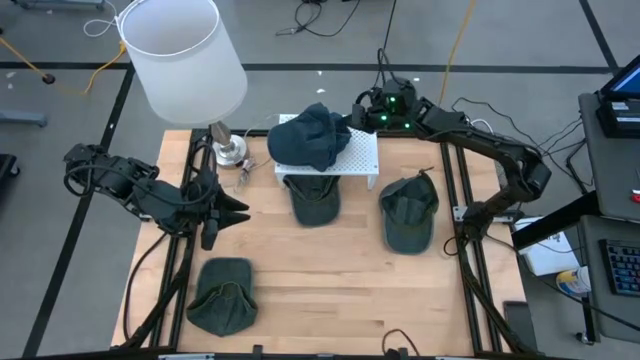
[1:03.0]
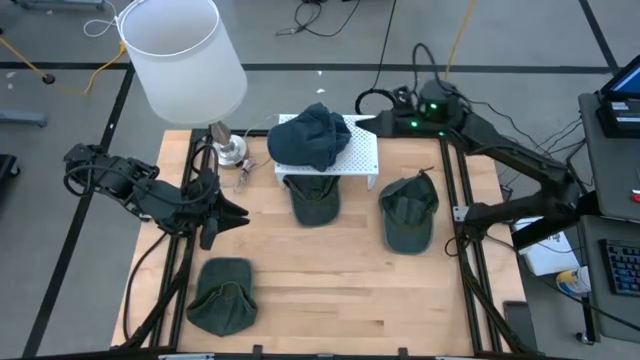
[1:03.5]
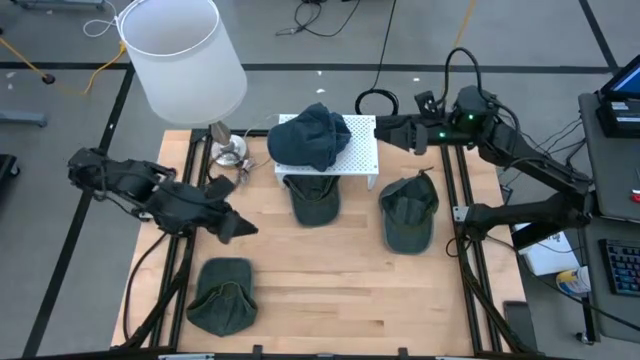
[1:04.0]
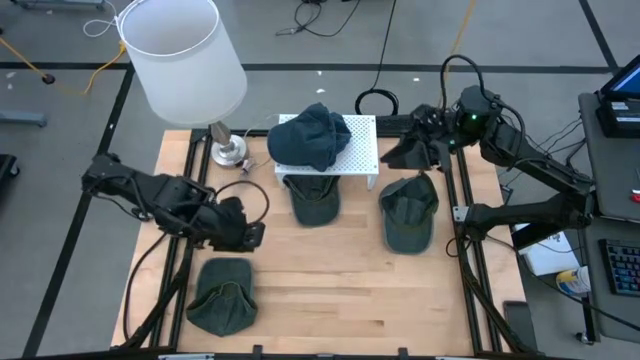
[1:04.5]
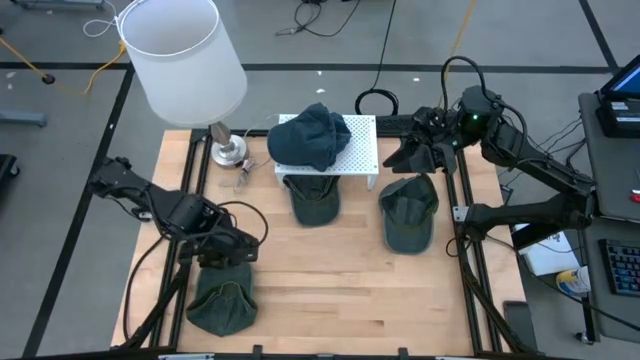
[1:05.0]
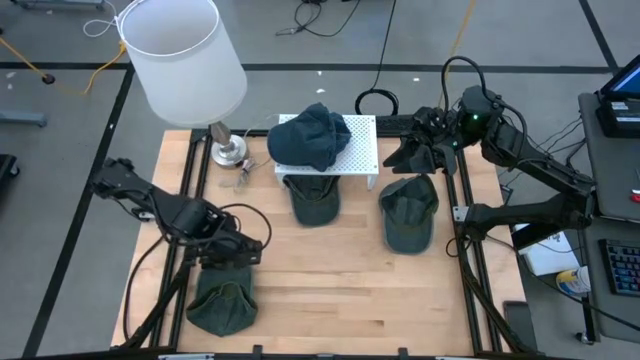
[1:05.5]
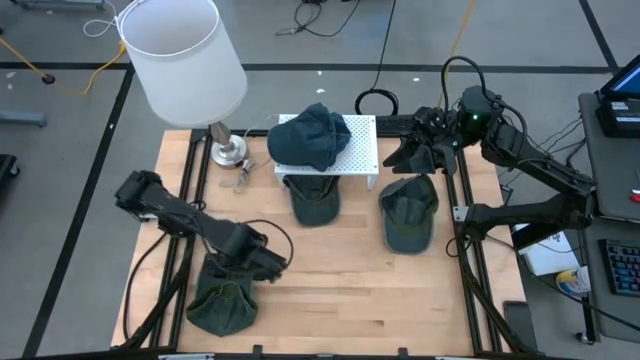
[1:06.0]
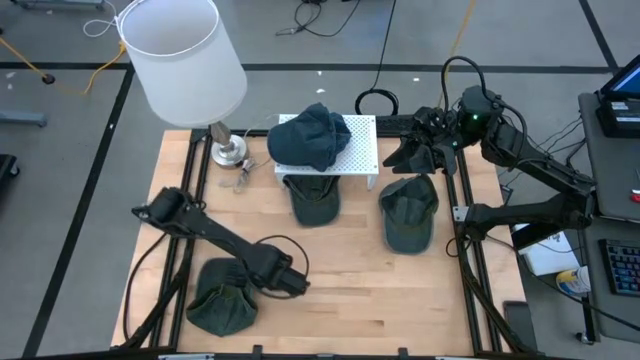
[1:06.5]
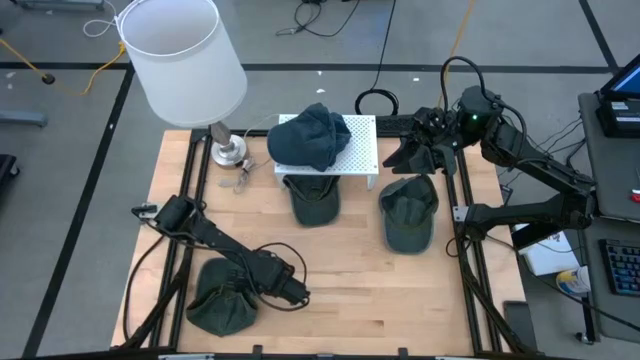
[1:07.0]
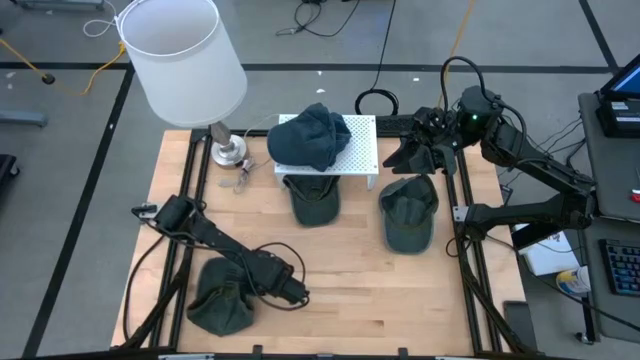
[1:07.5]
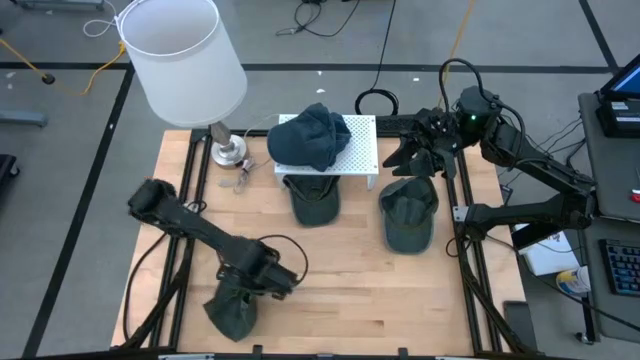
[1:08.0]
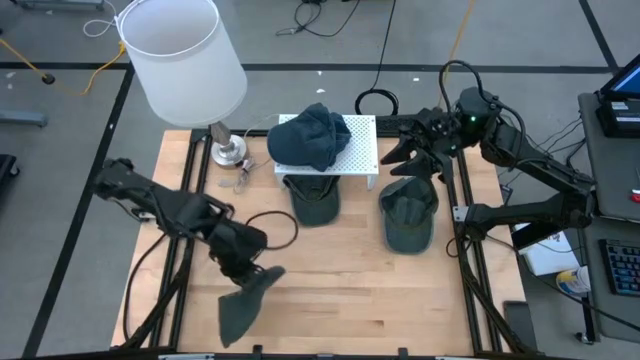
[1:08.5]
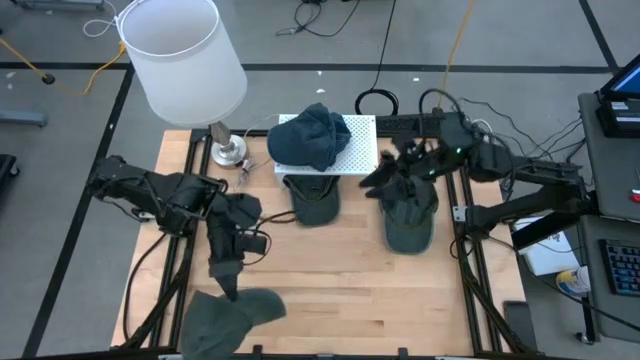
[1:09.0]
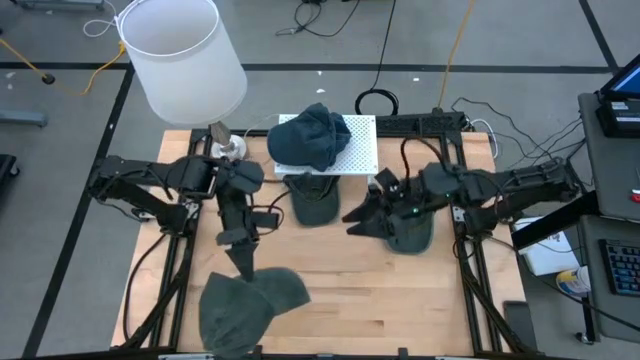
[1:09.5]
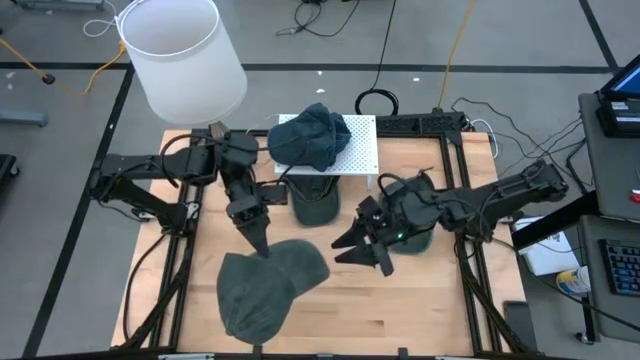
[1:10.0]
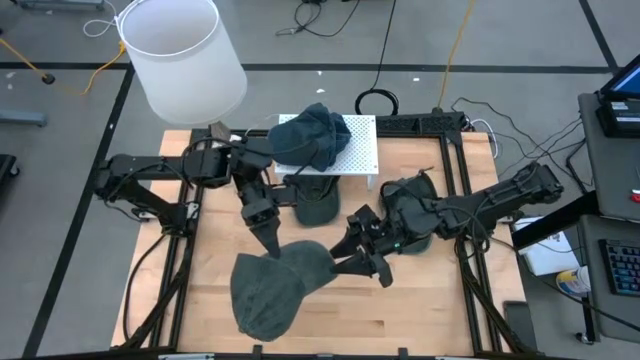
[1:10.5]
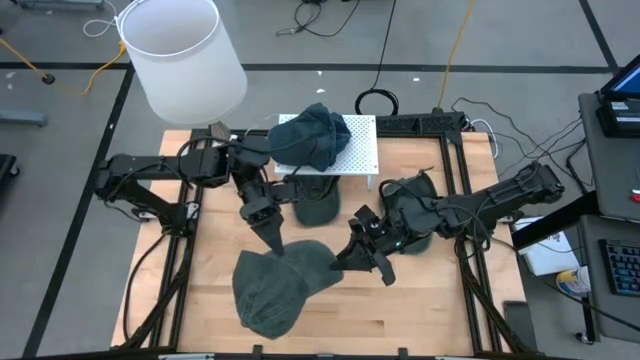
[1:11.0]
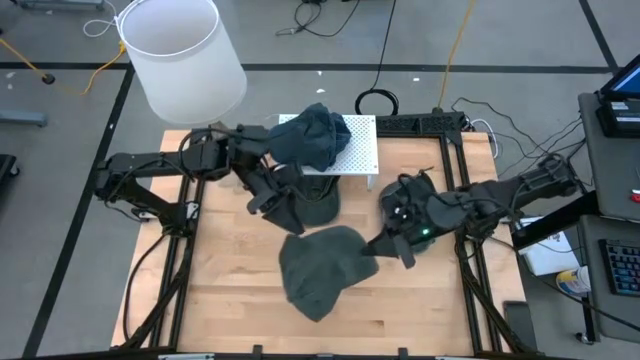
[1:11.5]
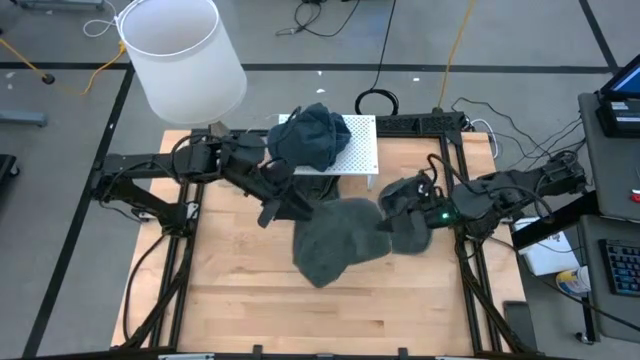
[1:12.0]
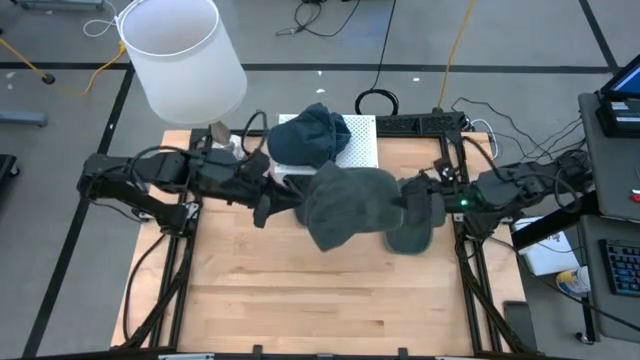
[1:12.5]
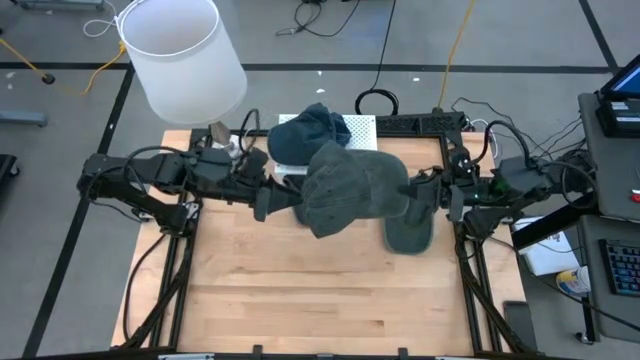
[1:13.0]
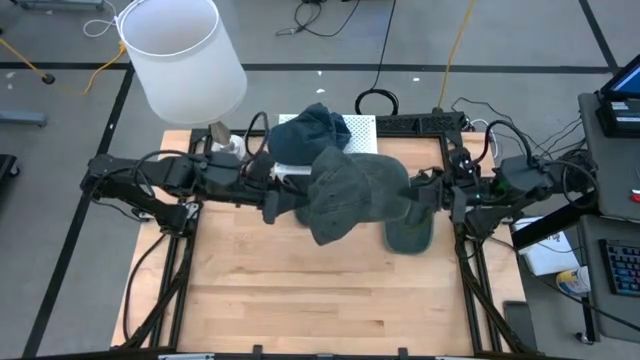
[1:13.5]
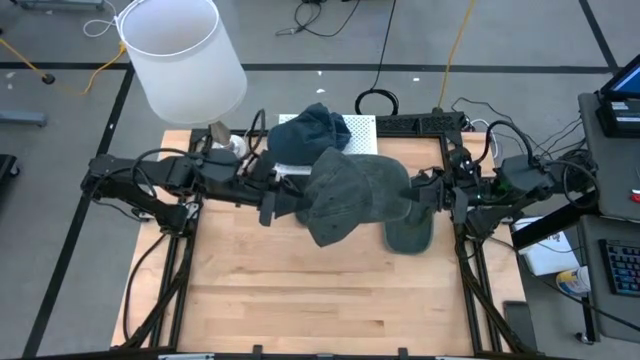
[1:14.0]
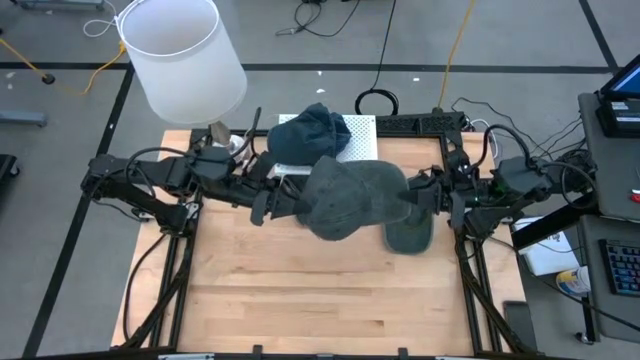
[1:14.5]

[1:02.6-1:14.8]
Task: Pick & Place hat
Put the left black cap on the shelf

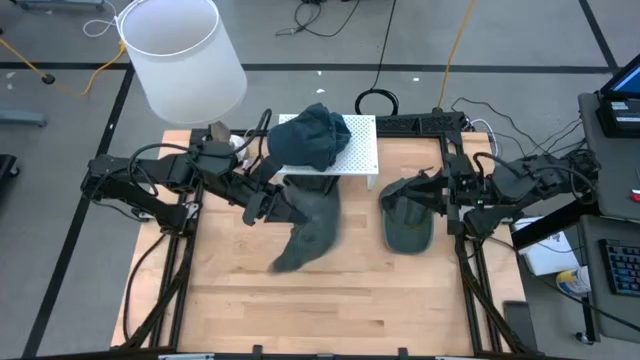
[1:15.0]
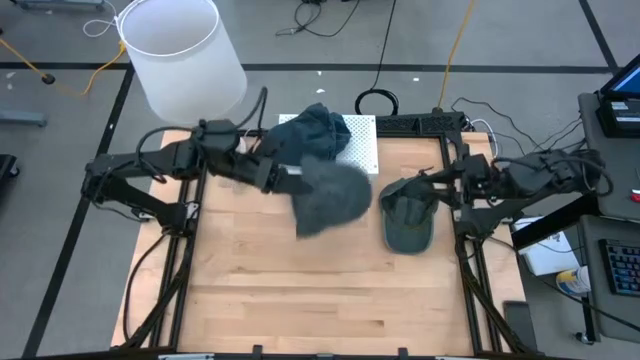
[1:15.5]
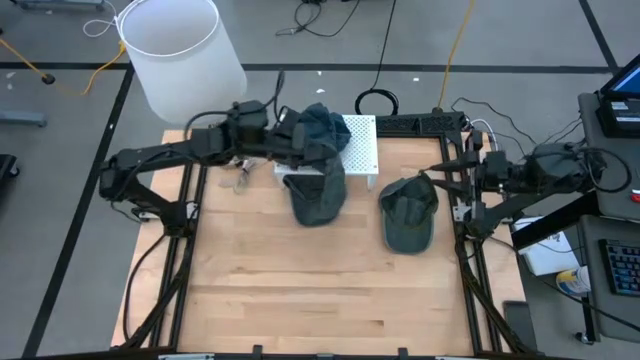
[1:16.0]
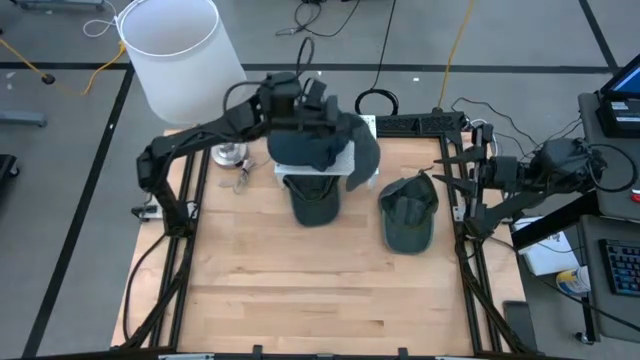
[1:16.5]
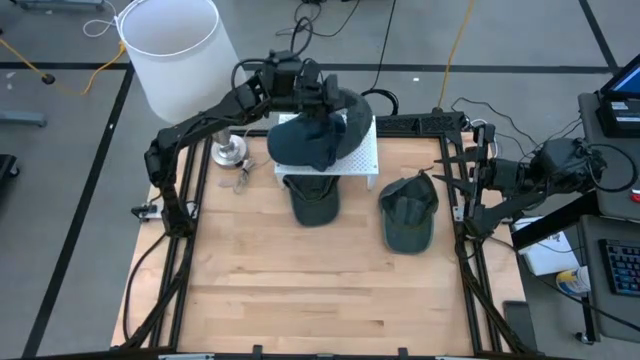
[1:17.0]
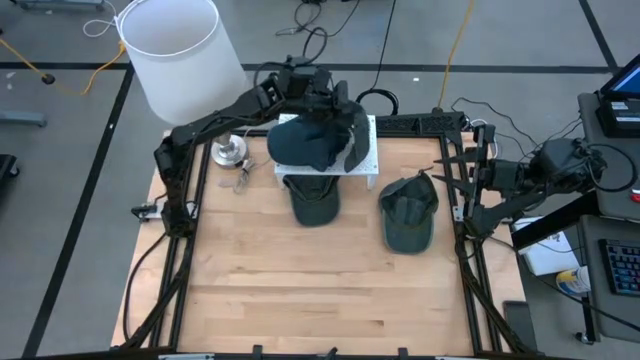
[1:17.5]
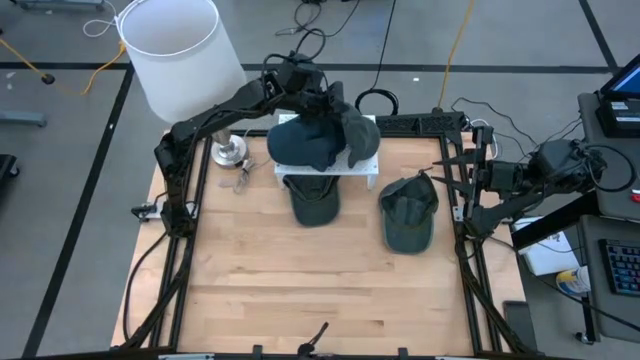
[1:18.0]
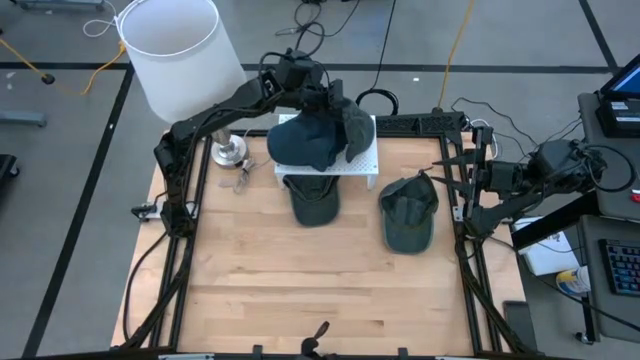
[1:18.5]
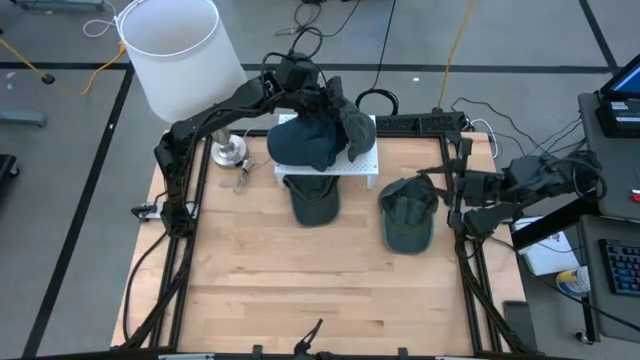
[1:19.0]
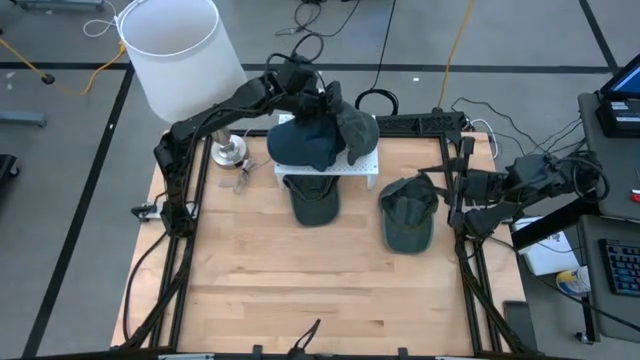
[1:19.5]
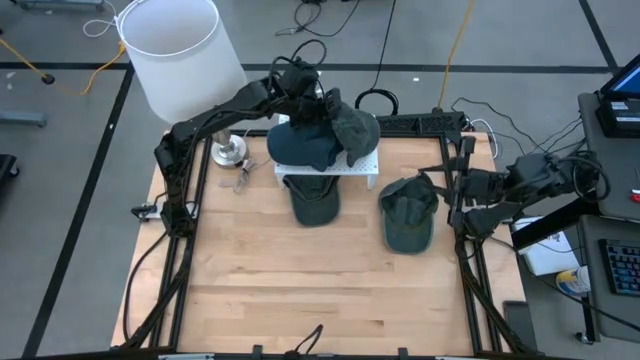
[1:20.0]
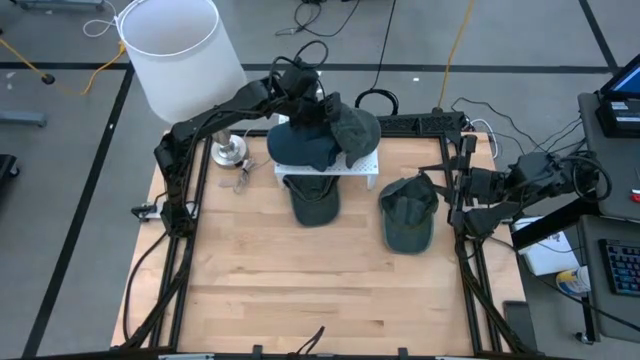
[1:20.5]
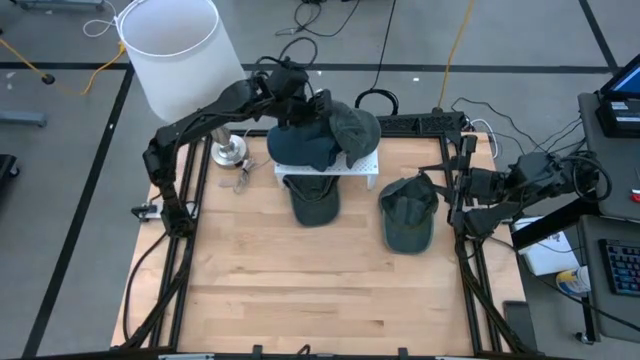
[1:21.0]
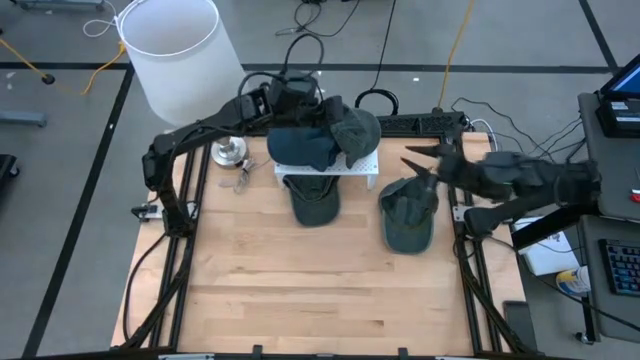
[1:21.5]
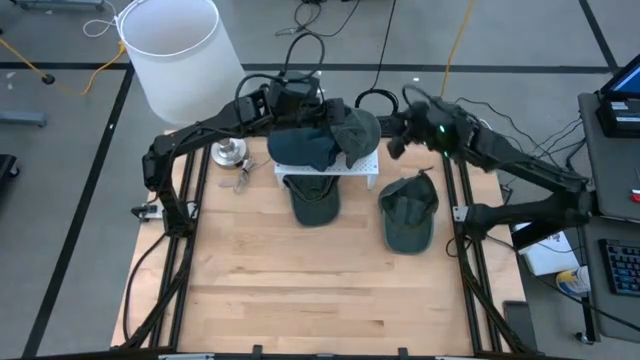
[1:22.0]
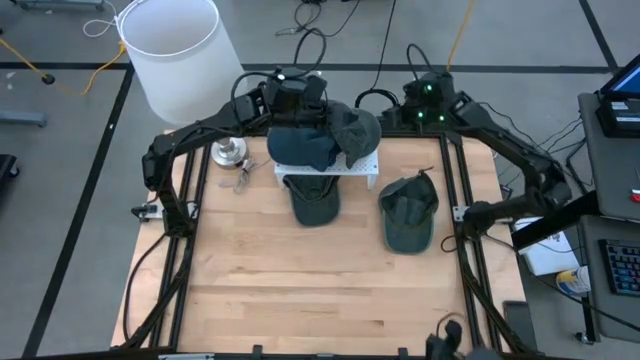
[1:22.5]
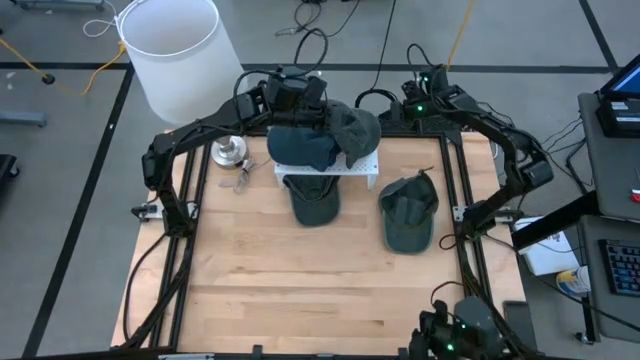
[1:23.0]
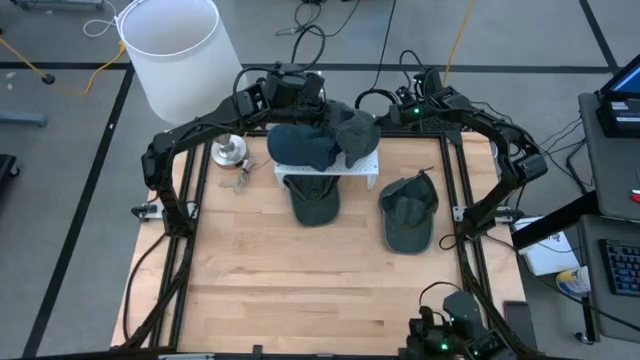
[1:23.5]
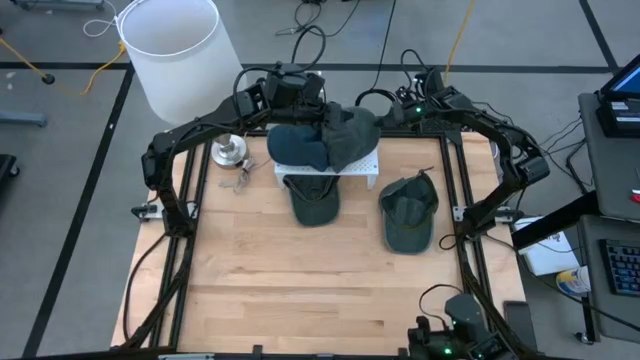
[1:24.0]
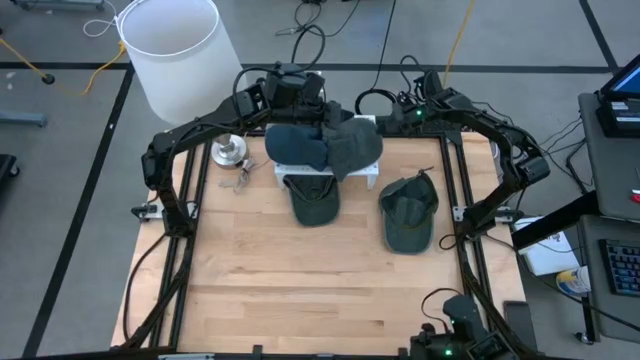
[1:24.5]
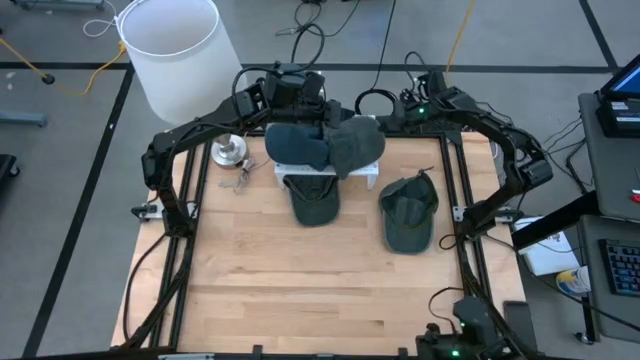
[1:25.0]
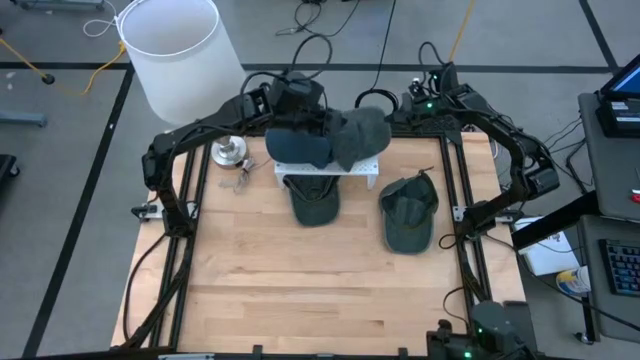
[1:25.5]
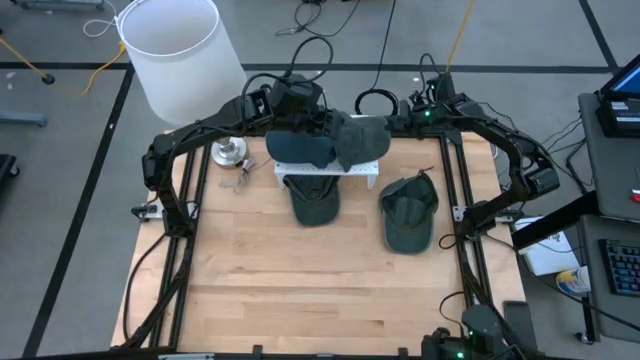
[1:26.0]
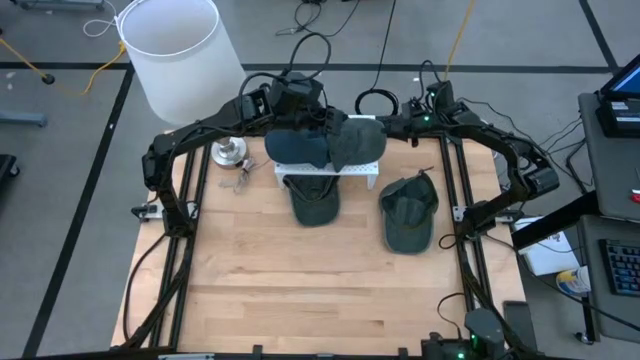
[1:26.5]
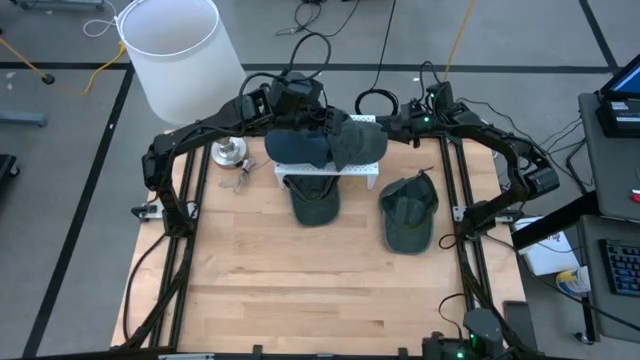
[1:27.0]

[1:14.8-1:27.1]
Put the left black cap on the shelf
